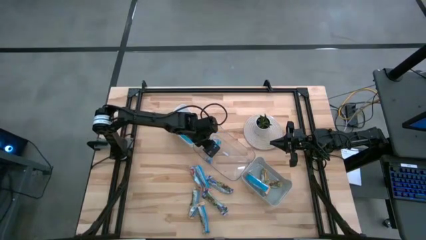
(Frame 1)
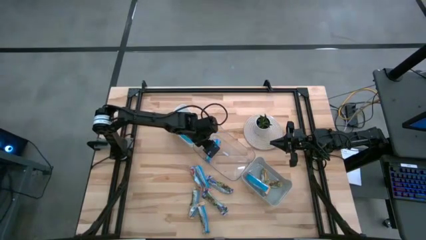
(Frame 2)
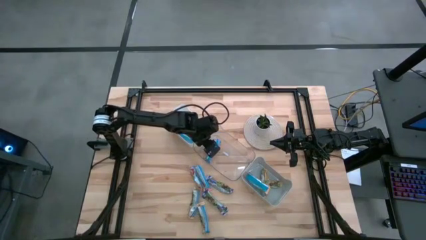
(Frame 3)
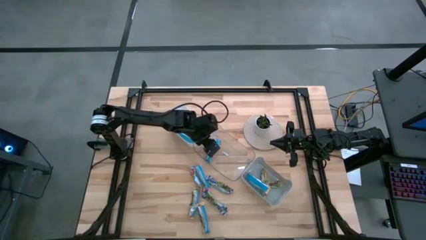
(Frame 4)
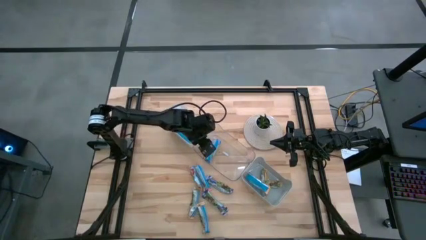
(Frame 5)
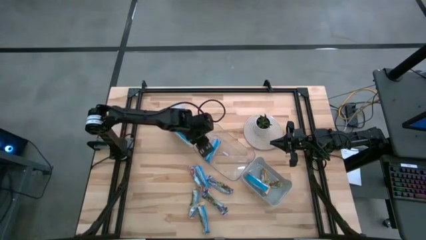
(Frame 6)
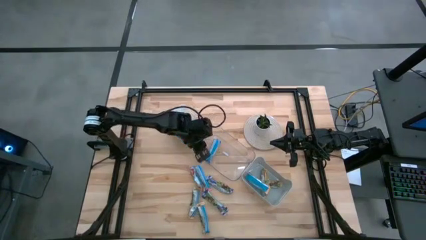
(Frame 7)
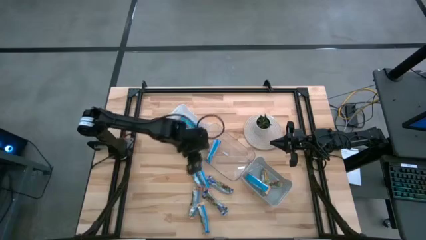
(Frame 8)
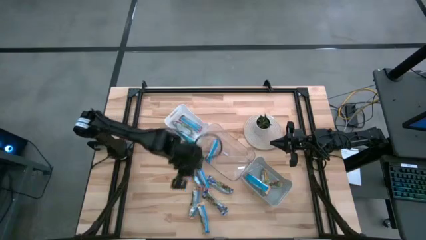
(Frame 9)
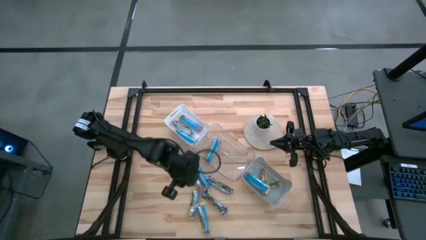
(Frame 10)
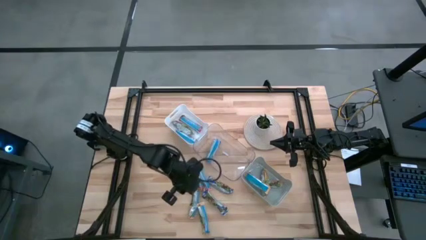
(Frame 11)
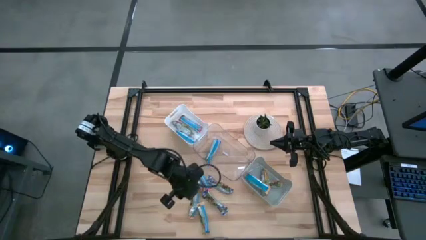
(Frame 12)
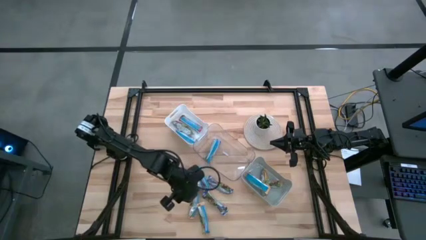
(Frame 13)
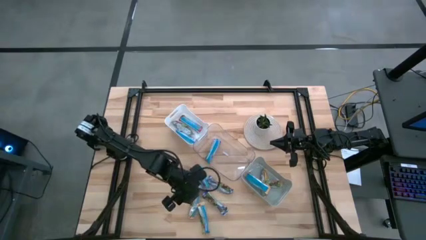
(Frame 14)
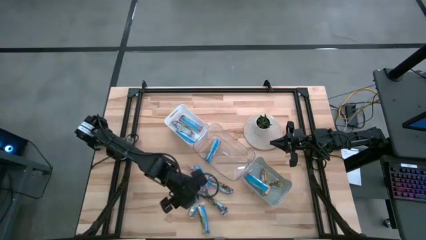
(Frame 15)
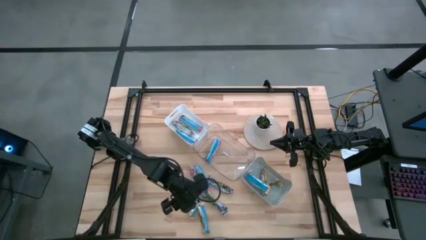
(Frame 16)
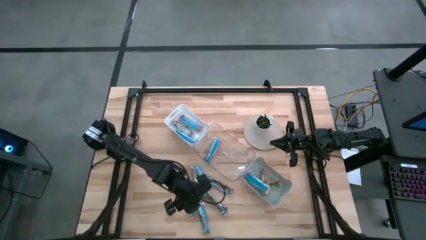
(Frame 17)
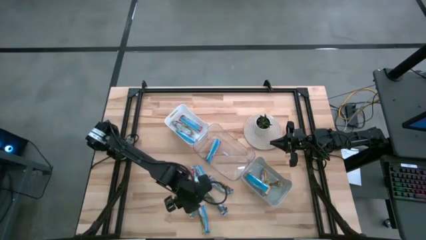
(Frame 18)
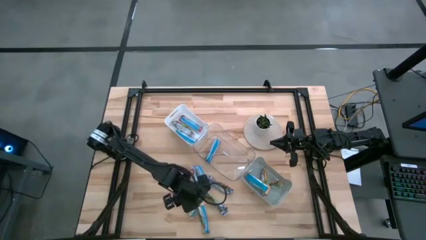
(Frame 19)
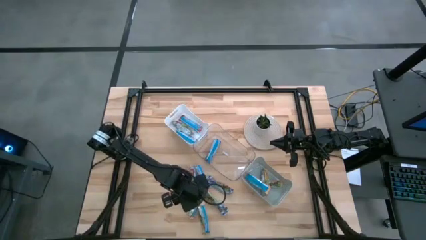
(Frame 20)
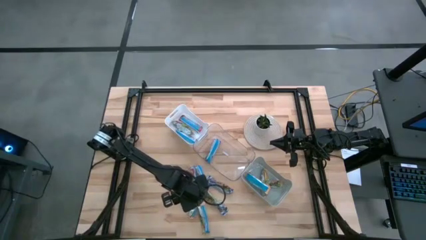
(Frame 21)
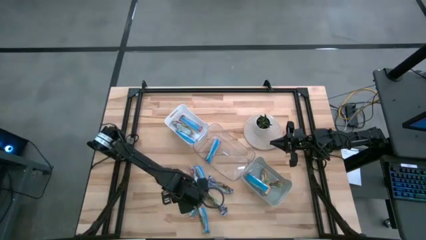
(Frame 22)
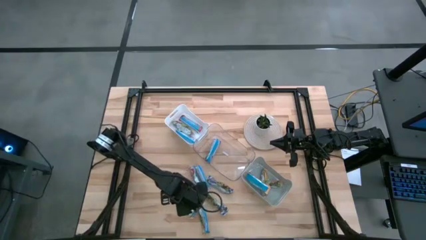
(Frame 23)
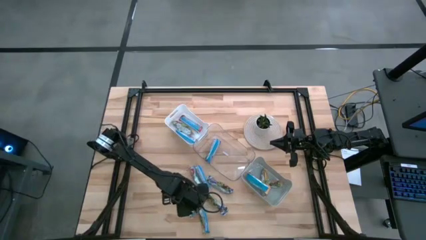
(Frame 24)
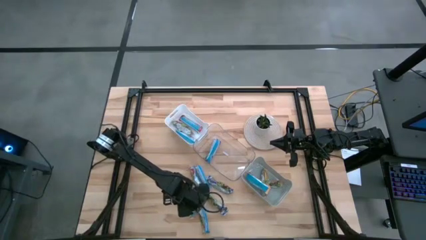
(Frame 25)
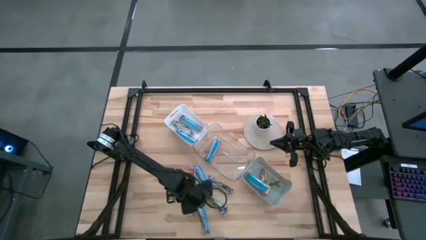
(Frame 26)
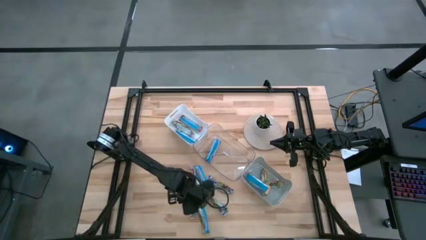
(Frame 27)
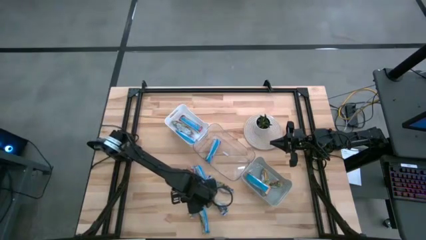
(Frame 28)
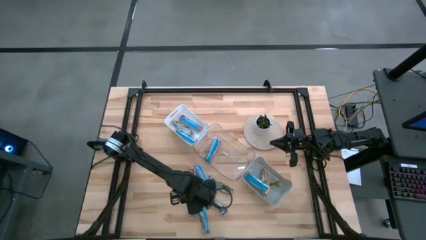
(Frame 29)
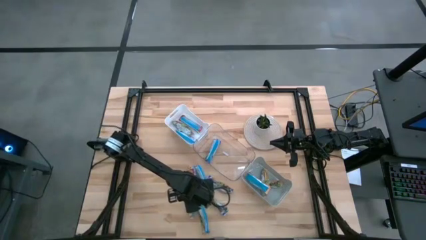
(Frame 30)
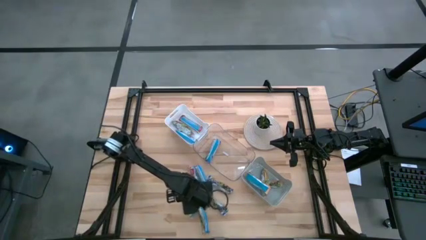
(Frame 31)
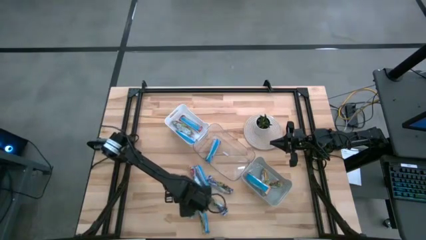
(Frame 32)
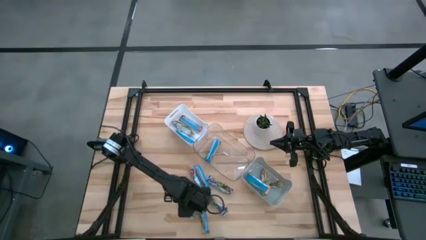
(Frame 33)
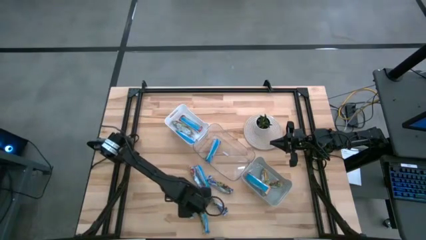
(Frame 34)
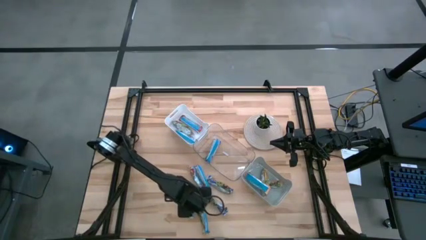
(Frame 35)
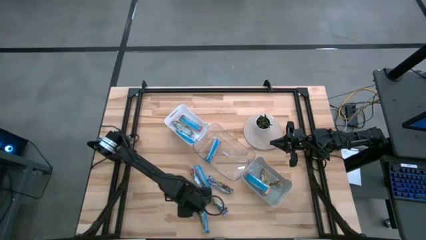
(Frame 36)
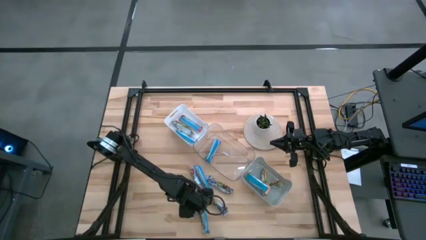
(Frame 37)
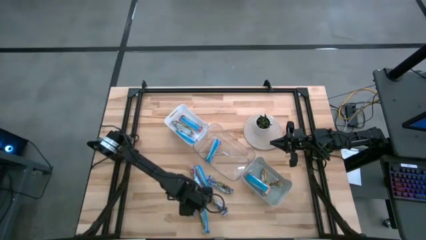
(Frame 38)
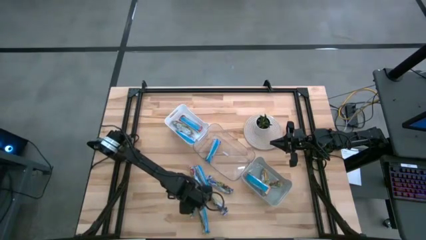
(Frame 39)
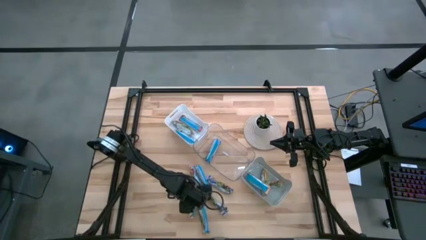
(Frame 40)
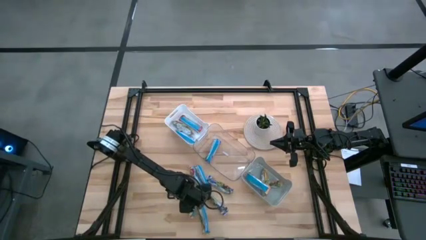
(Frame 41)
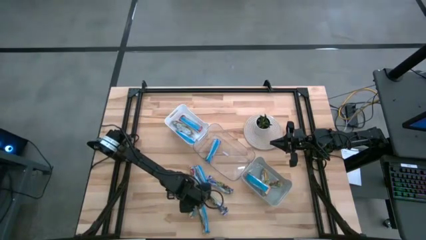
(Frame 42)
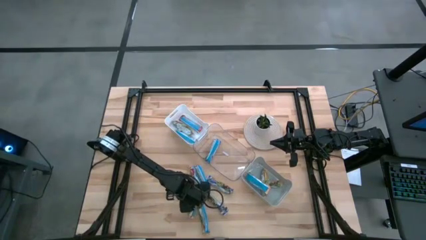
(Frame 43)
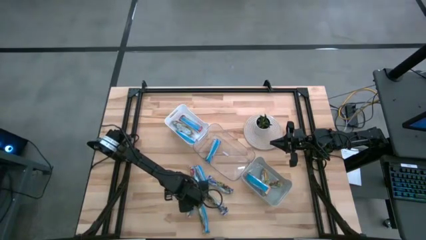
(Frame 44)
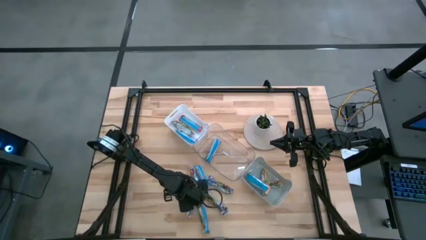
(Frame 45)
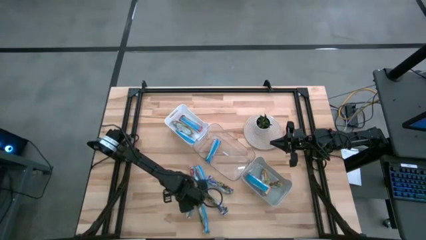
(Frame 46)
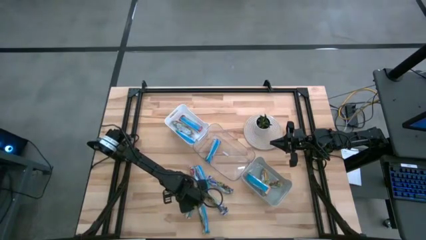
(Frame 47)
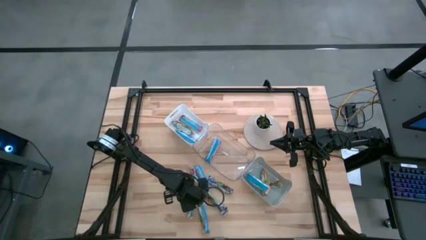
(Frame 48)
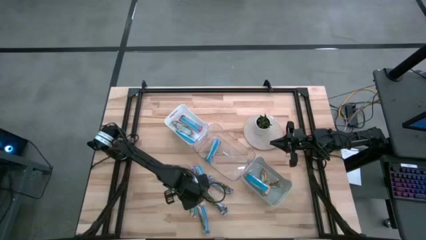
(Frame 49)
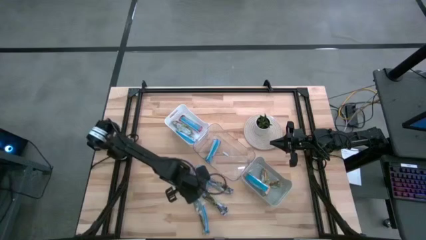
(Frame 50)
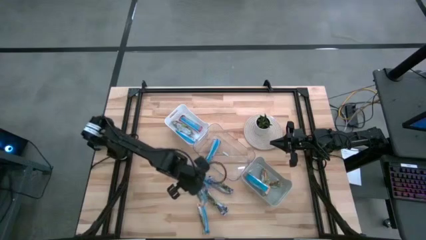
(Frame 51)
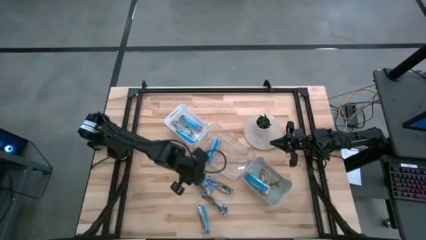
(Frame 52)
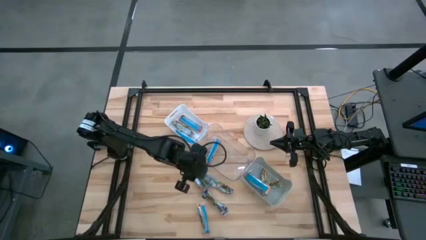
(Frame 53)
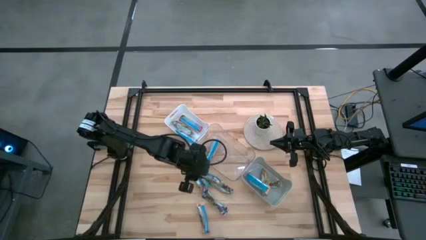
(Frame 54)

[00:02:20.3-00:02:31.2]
Task: Pick and place Granola Bars by type
Put the orange granola bar into the gray bin

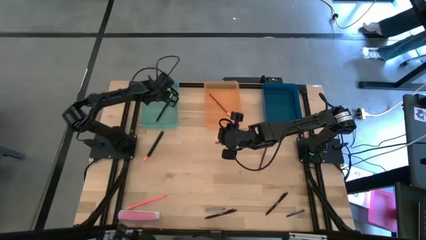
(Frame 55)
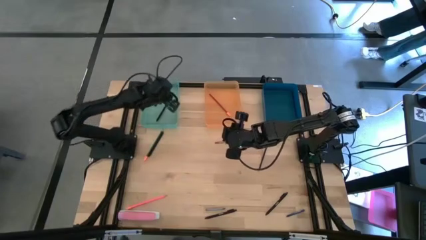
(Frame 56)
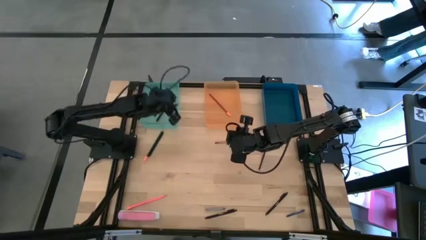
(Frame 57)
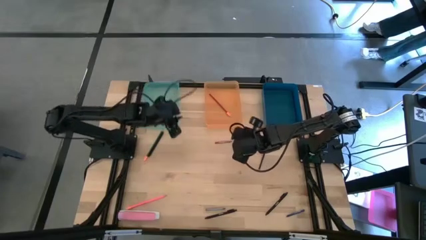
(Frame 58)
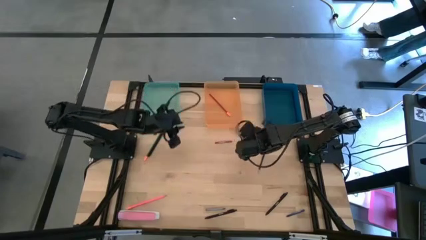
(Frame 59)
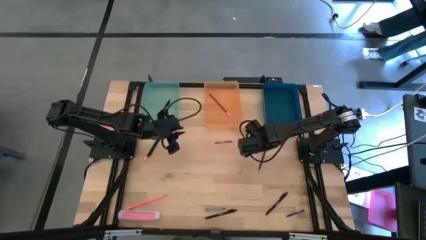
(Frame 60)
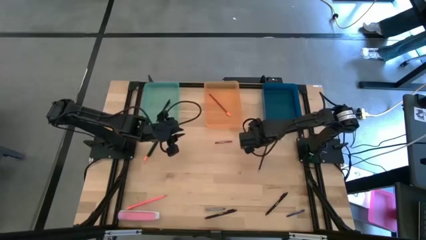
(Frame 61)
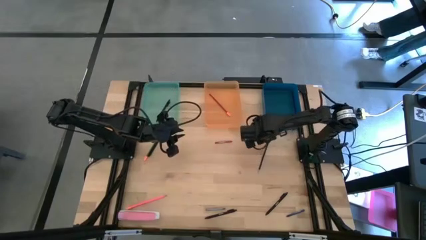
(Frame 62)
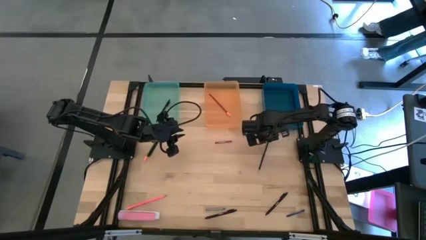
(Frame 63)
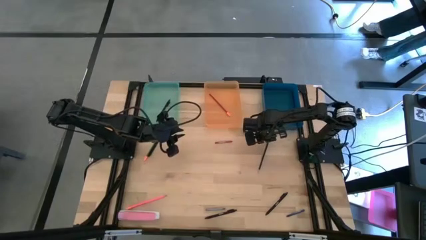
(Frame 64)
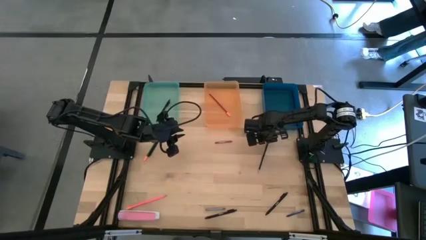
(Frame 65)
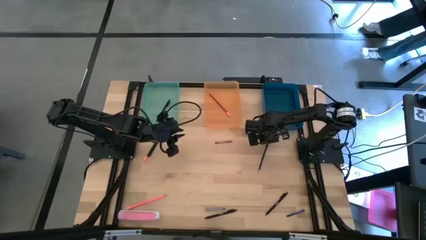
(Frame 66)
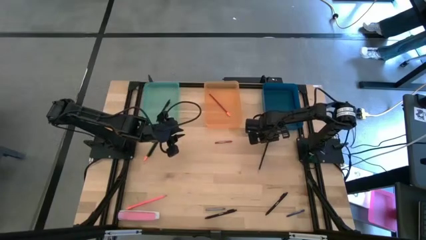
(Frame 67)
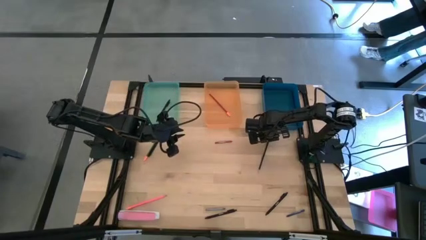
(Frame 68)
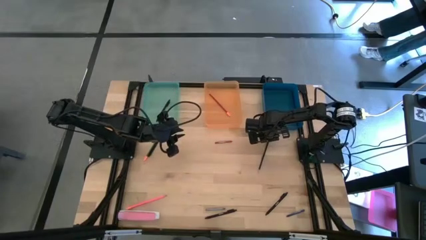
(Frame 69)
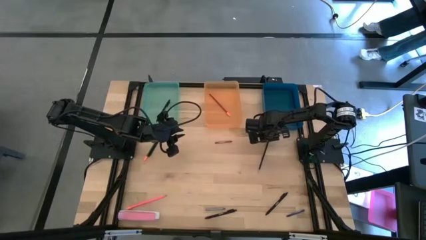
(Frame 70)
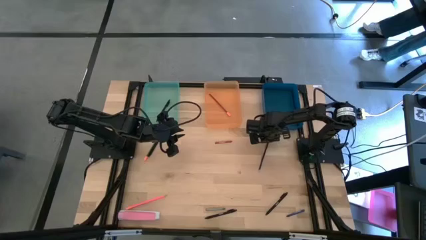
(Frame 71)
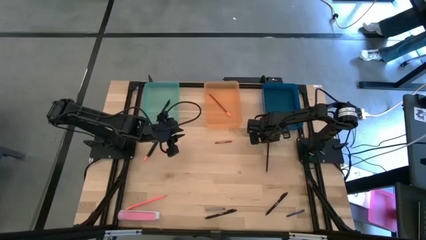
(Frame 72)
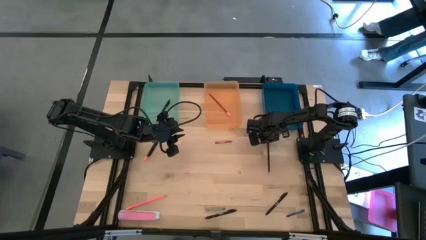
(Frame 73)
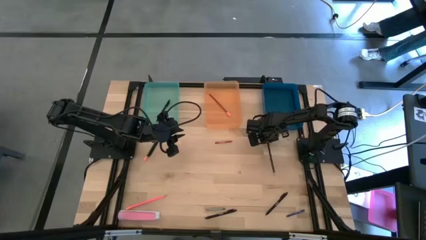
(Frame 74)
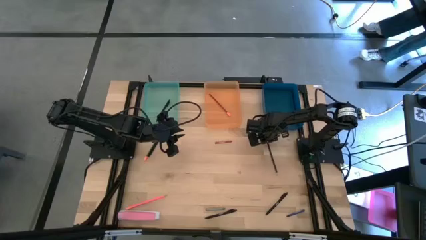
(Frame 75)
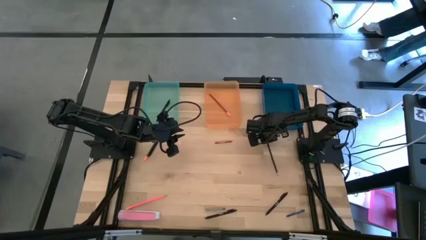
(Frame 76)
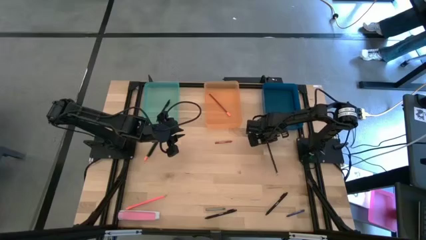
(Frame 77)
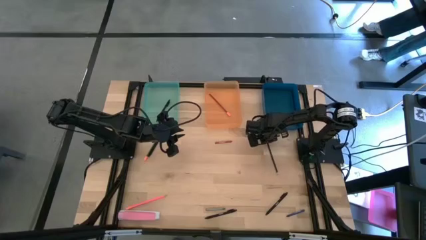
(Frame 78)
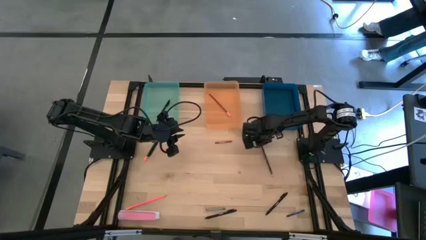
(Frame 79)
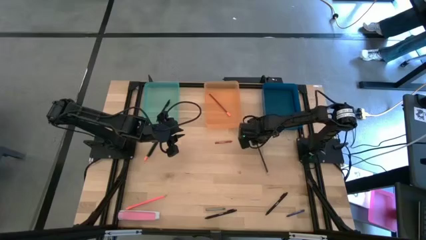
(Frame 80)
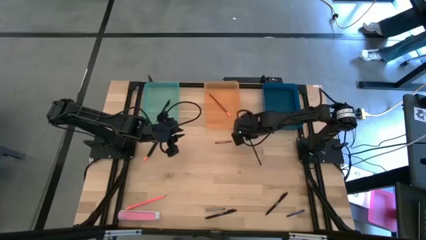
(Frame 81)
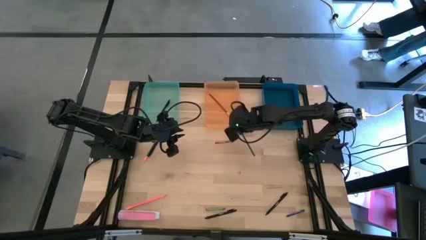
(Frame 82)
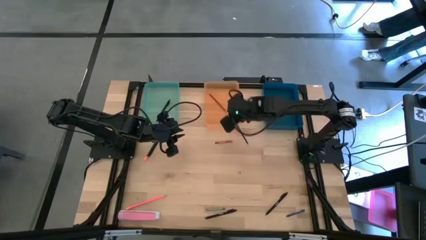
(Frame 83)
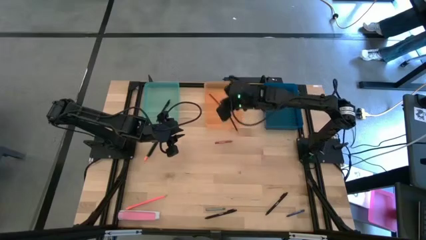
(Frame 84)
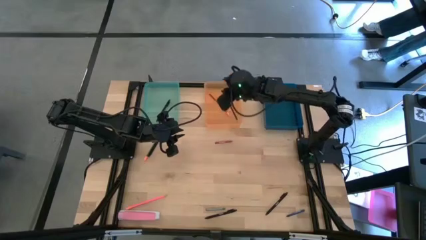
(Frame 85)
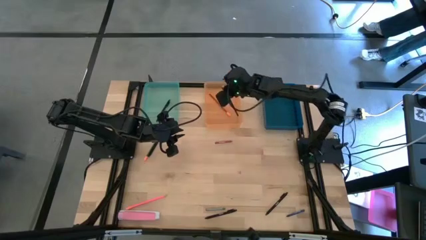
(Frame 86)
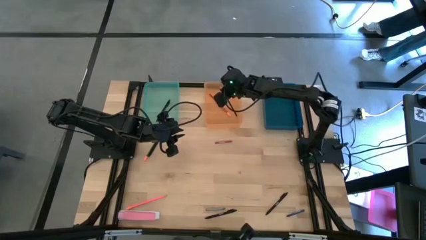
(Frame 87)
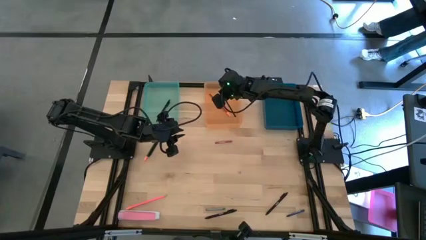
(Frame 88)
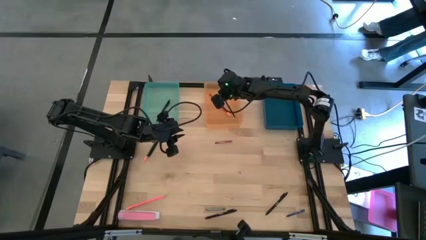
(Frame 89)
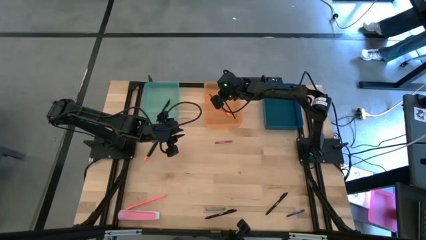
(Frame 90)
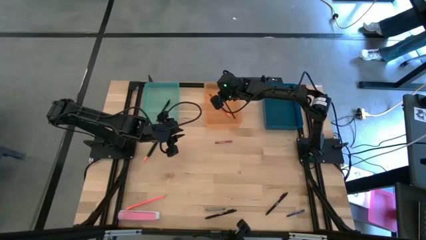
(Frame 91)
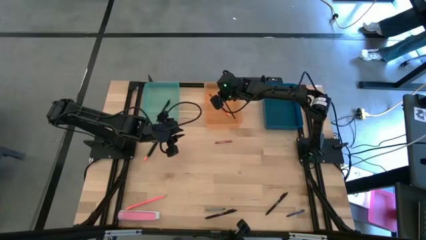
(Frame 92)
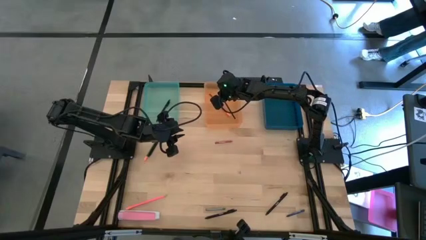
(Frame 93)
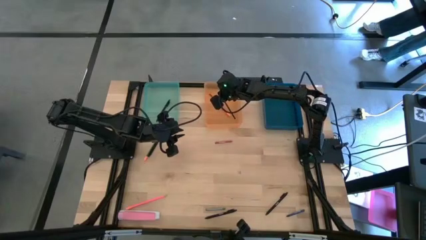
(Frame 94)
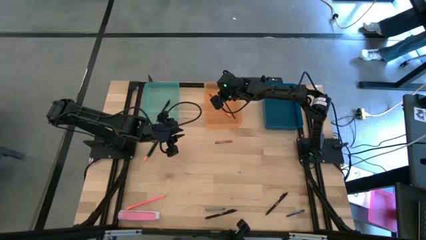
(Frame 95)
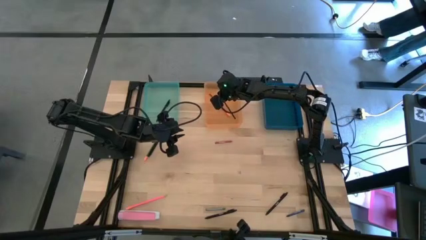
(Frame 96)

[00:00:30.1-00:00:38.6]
Task: Sort crayons/erasers/pens/pencils in bins
Put the blue pencil into the orange bin
